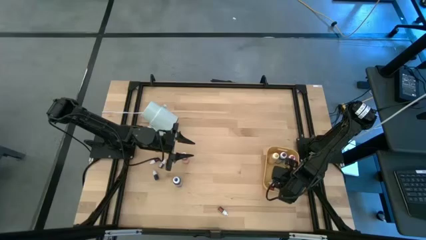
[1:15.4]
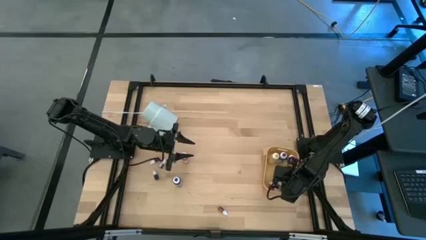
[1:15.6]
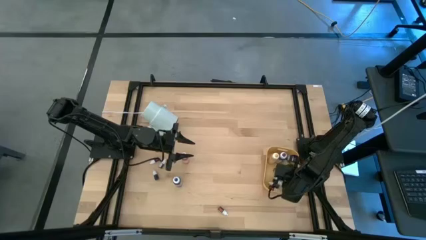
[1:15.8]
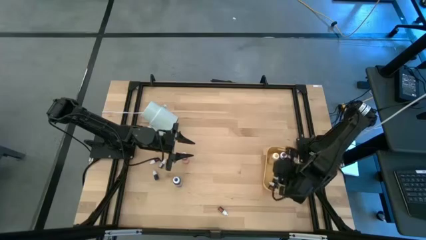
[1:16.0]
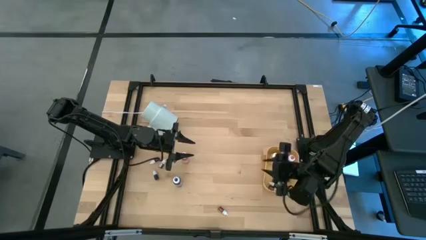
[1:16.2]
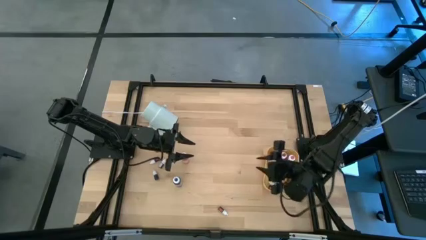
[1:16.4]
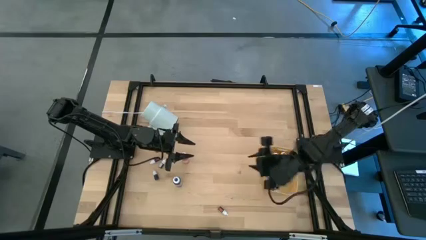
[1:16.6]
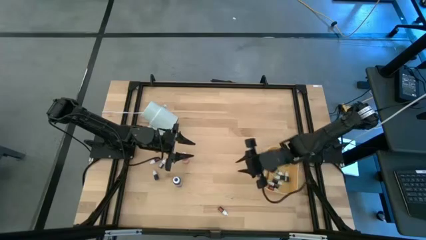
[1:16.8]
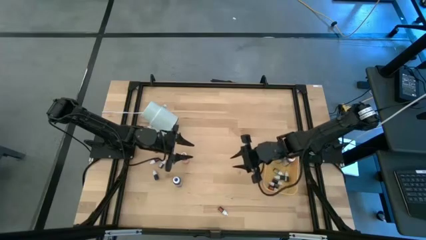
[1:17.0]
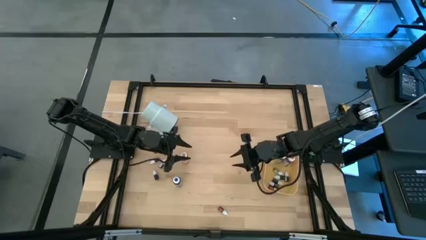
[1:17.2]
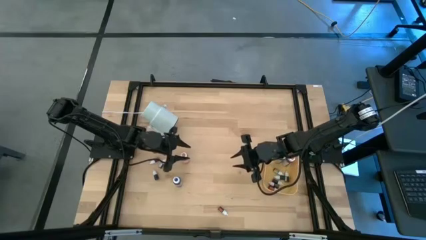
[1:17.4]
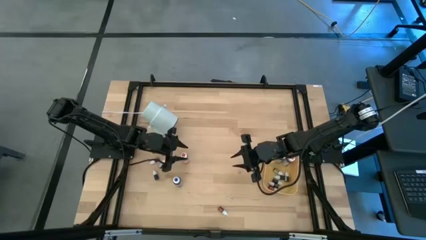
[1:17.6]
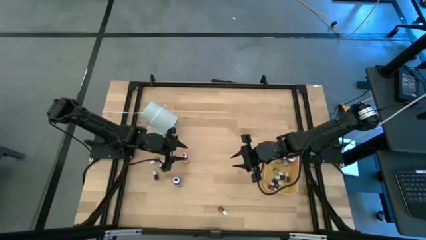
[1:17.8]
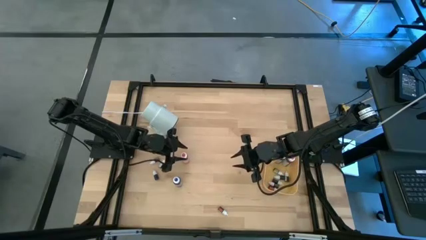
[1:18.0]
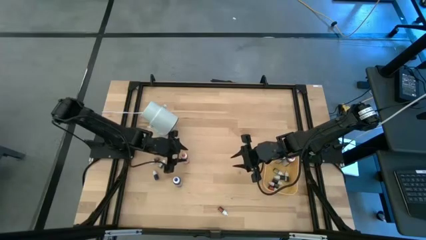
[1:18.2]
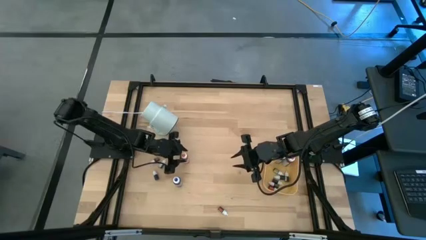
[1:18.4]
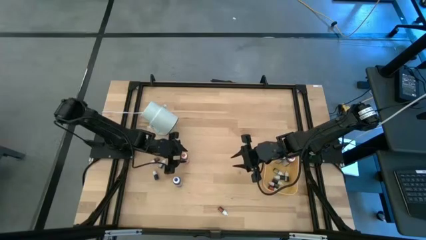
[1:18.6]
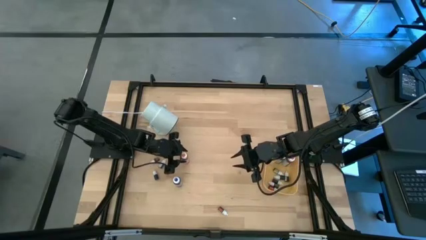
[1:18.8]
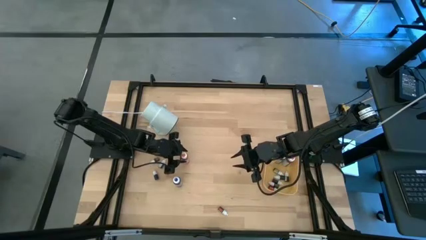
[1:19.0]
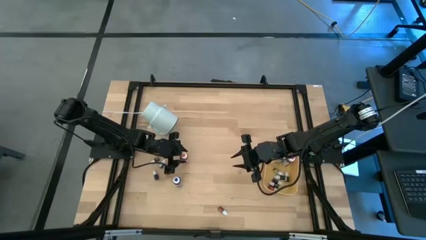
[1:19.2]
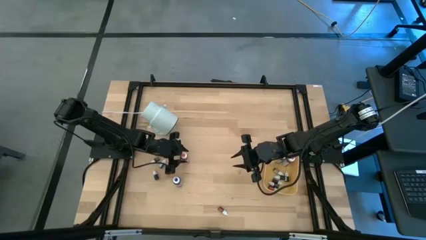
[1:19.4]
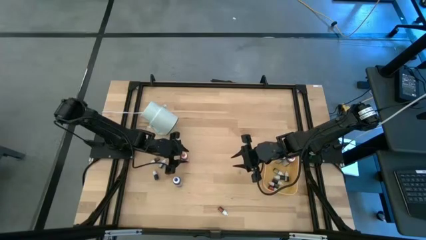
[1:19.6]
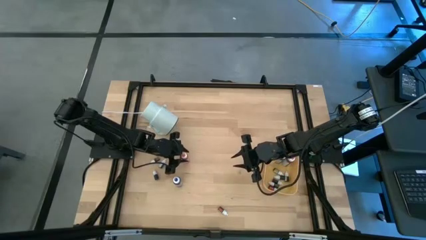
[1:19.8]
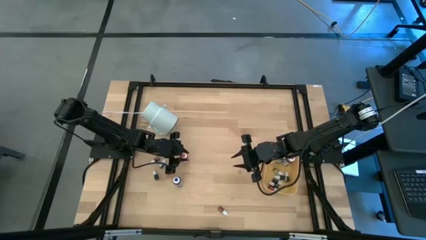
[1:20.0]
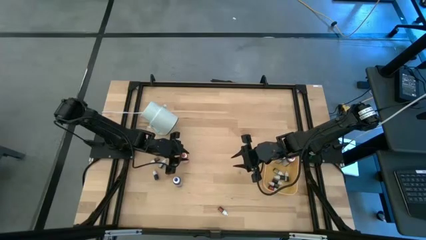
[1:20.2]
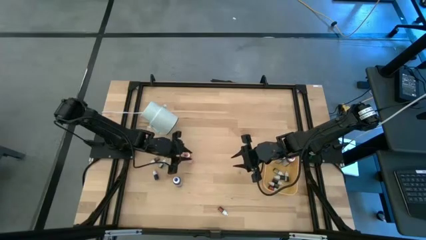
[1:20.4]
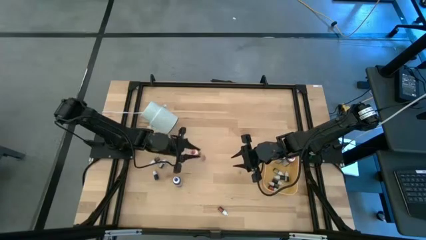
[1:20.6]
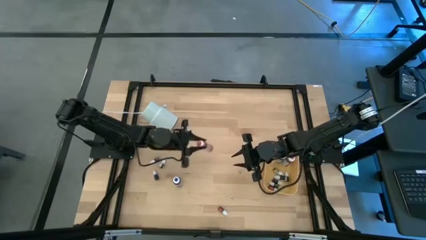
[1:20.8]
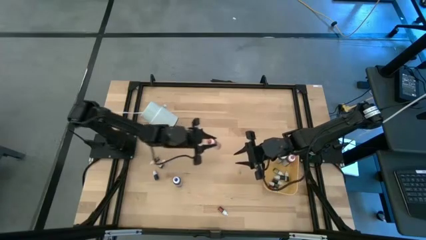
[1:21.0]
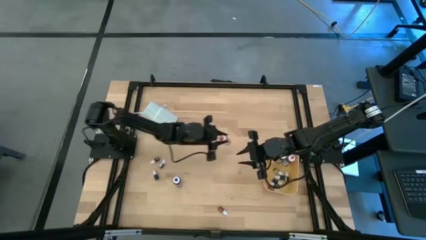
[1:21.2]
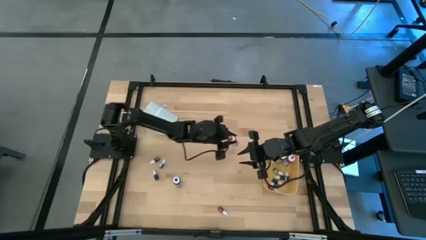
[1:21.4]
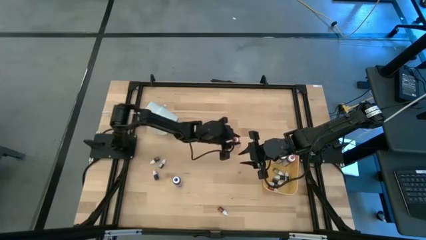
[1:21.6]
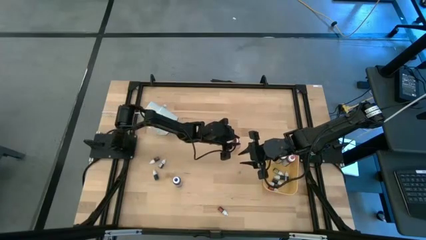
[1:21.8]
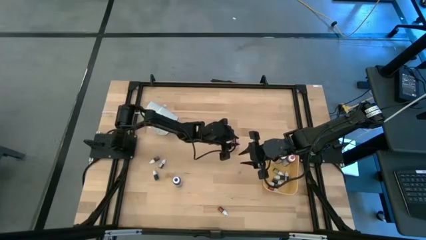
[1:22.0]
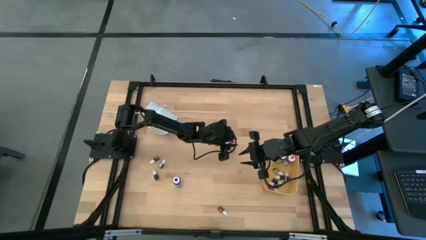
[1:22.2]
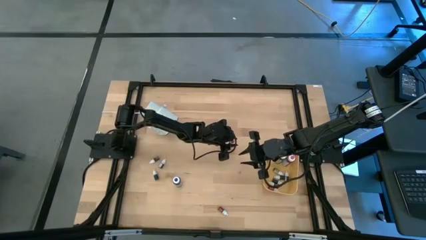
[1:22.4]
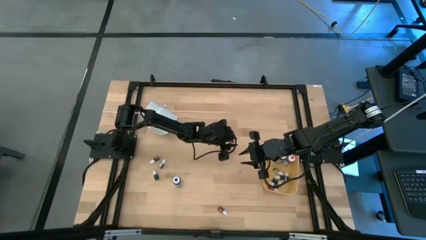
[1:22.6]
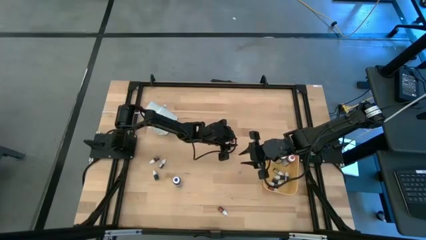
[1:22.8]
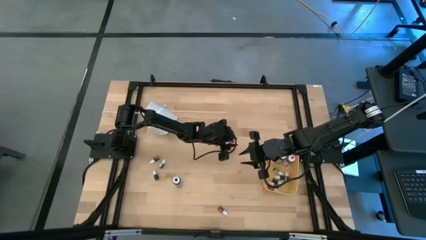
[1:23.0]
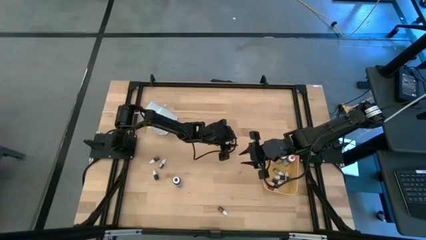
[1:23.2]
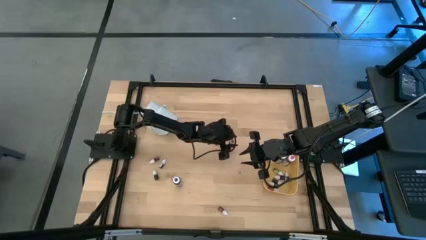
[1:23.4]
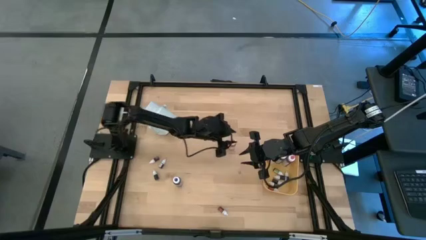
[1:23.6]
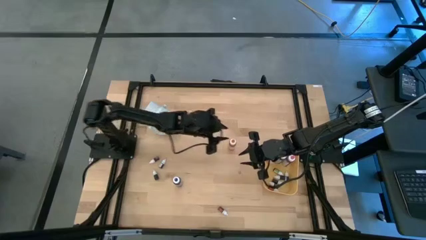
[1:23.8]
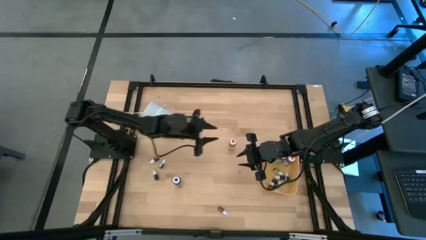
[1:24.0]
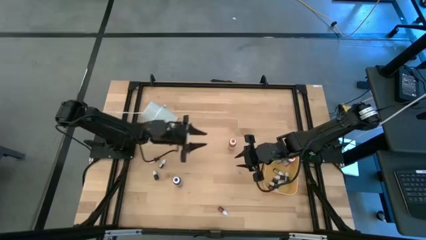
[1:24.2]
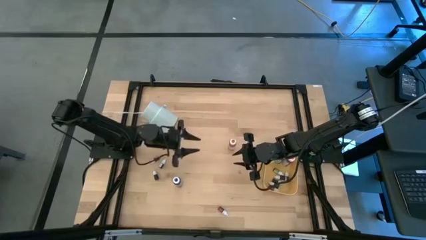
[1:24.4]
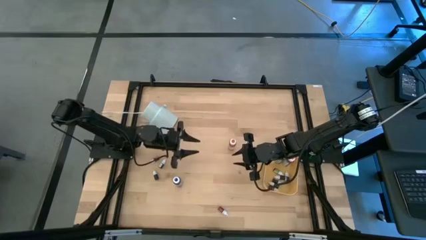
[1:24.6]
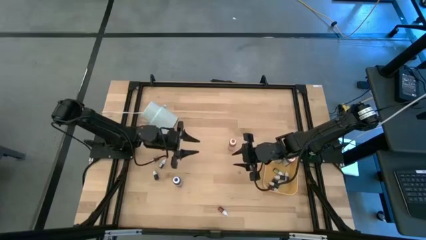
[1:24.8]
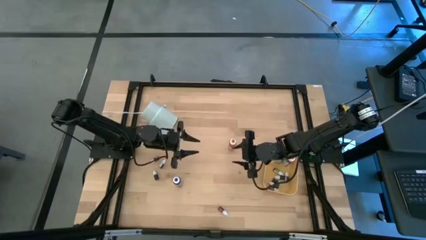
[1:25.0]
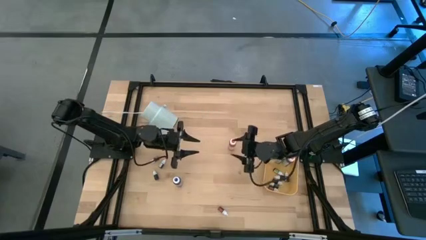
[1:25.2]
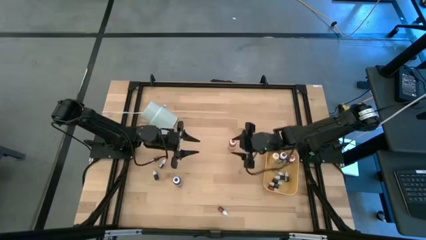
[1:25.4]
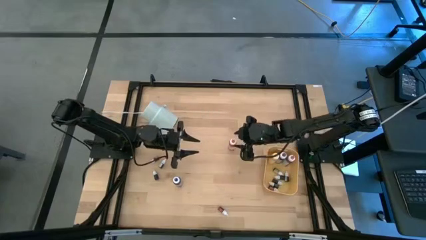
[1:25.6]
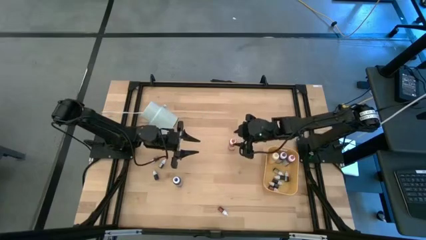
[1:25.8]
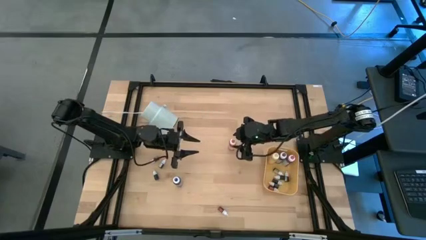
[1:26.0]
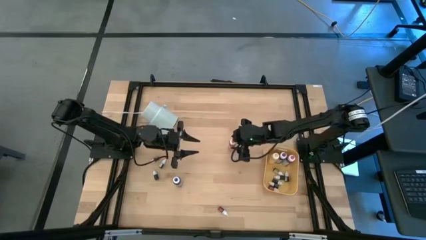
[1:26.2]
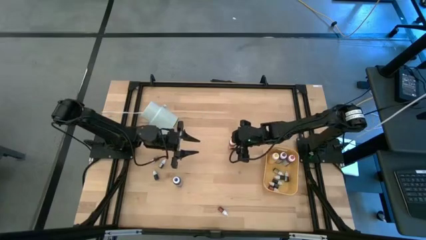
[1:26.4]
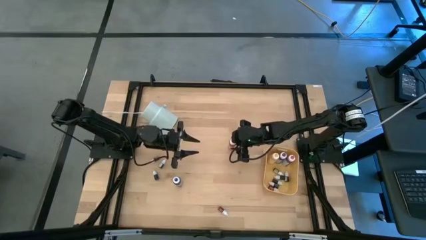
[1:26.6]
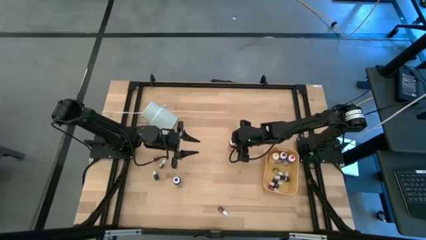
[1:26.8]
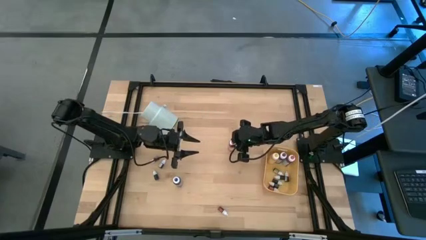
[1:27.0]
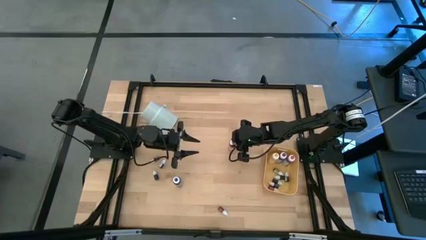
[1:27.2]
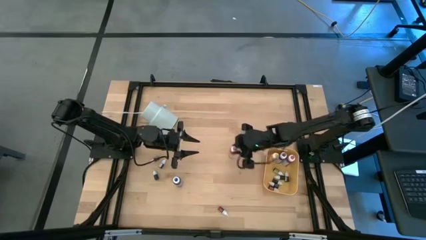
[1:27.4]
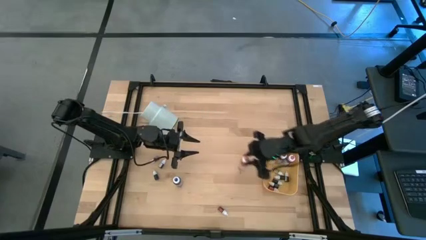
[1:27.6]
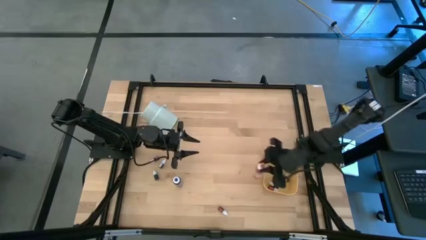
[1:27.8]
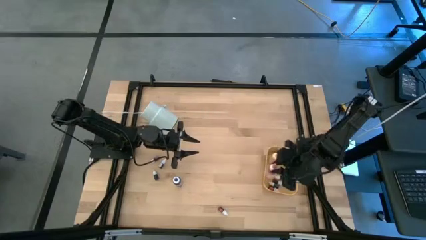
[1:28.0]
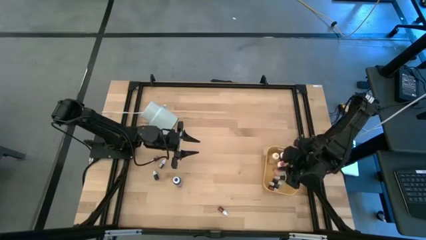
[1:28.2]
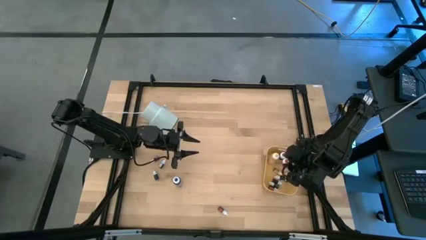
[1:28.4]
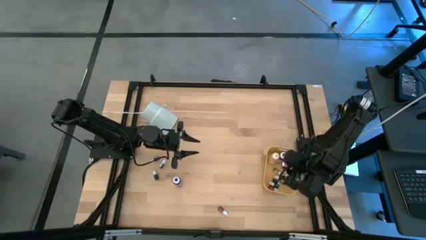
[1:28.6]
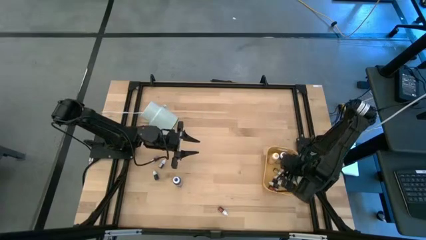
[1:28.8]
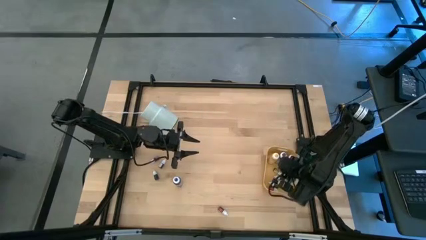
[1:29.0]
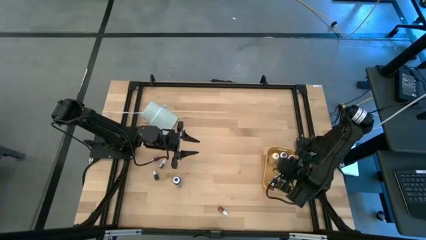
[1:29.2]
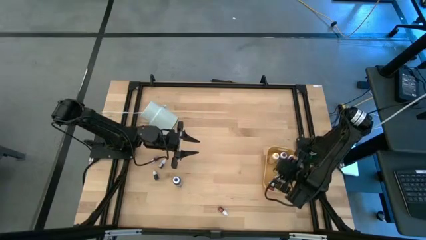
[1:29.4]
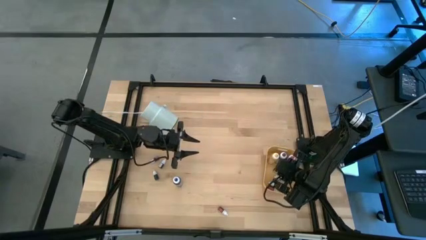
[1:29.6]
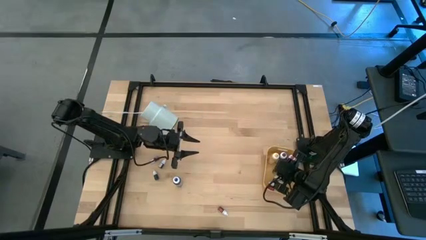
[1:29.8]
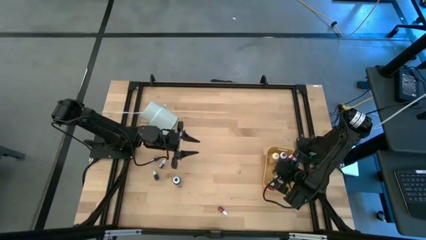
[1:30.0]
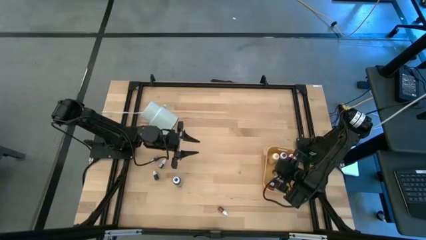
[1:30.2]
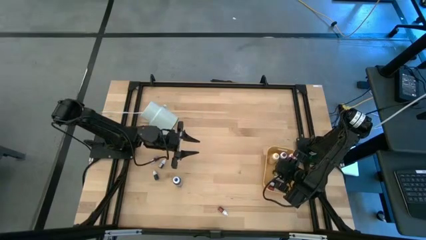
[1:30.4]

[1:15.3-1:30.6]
Task: Pick & Place food coloring
Put the large orange food coloring bottle into the yellow bin
